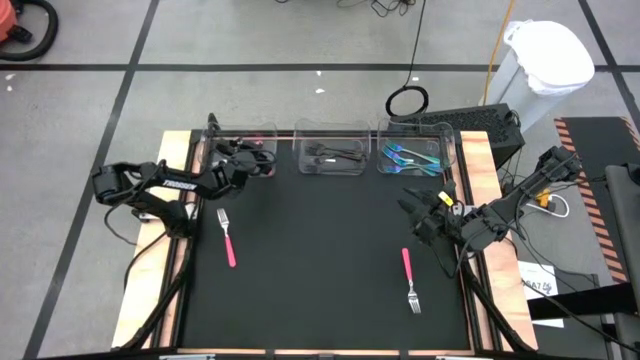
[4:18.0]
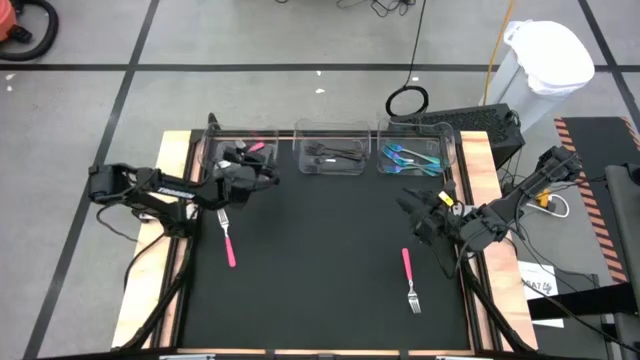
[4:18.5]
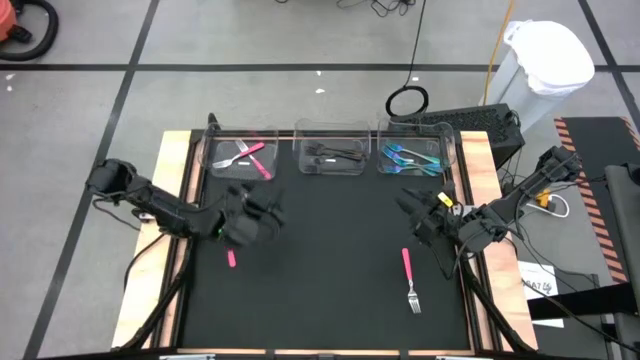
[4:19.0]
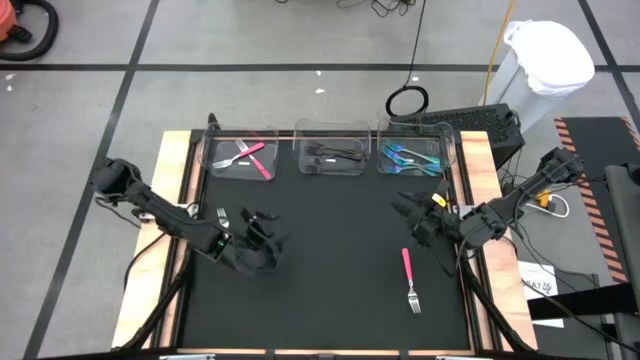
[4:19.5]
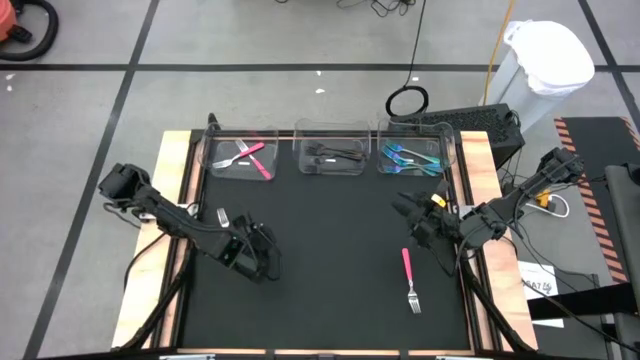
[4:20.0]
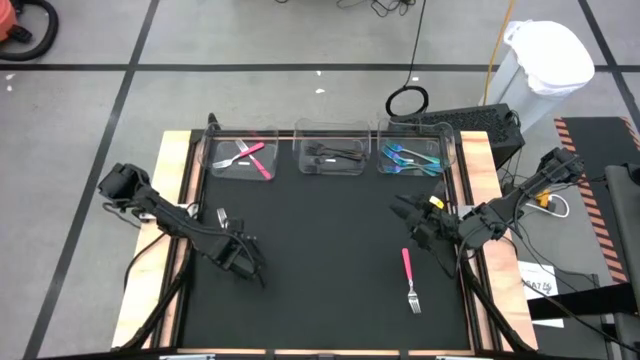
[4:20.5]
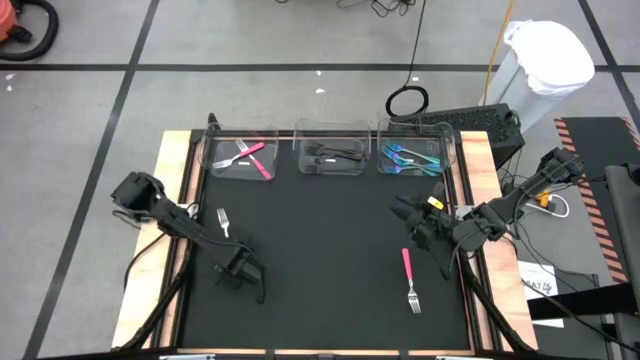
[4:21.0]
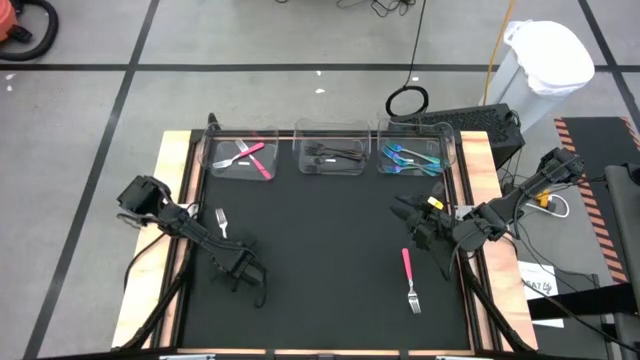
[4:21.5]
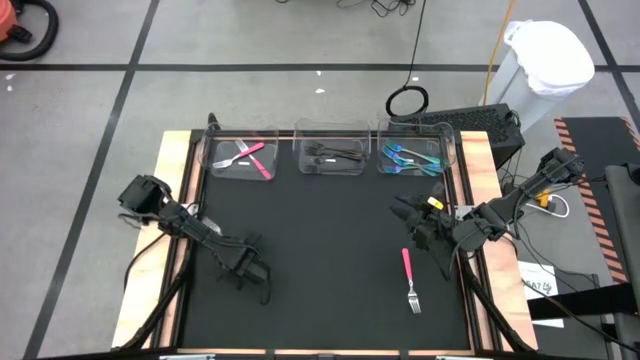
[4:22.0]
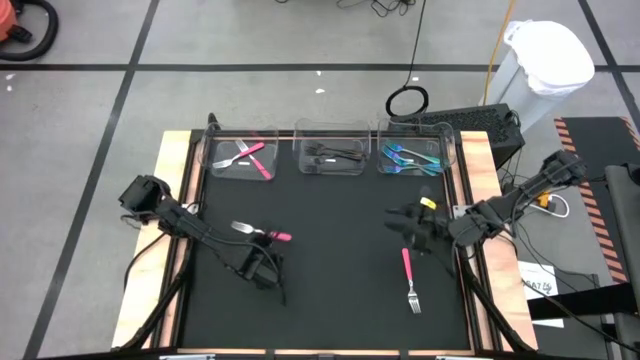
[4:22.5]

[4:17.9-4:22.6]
Task: Sort silverware by color (type)
Put the pink fork into the left transparent bin

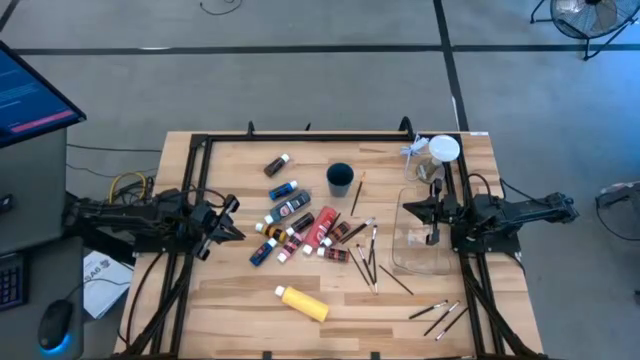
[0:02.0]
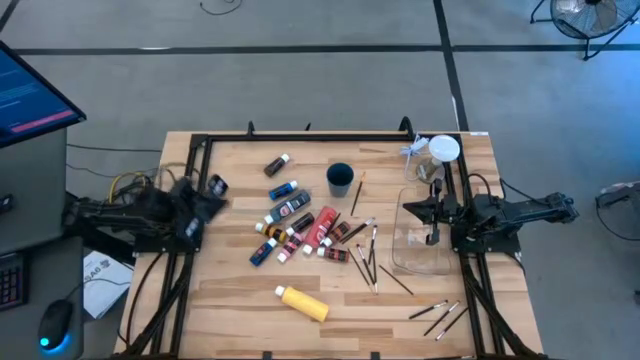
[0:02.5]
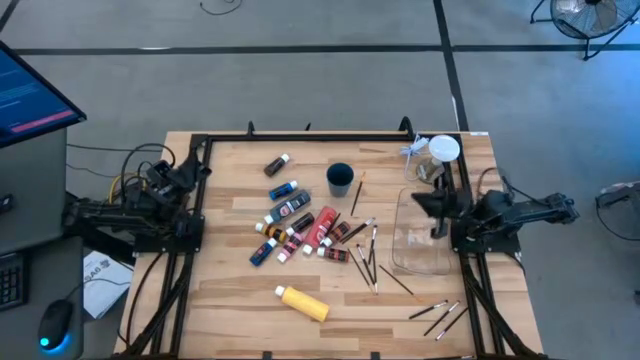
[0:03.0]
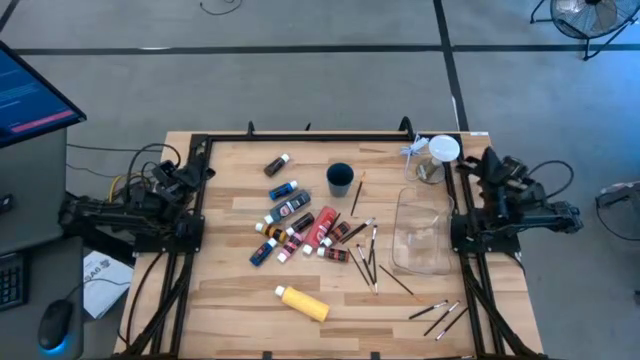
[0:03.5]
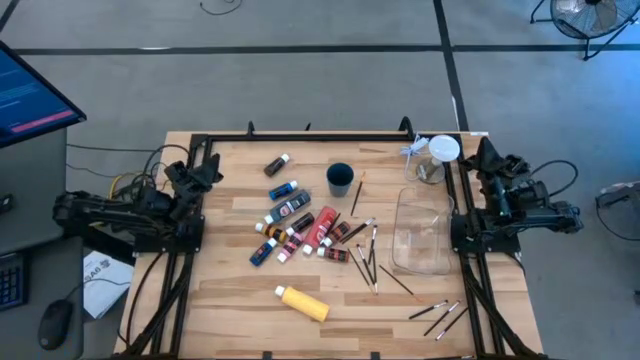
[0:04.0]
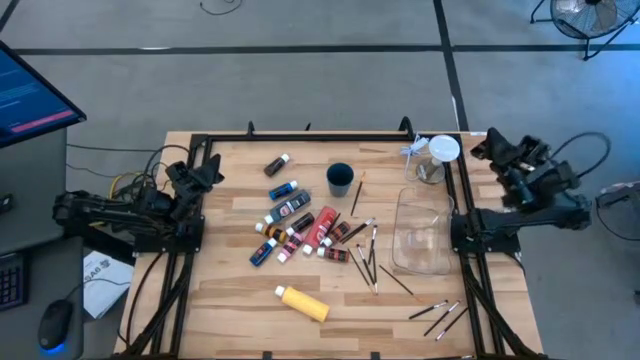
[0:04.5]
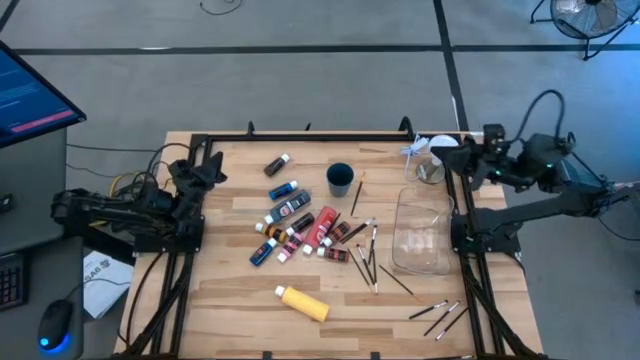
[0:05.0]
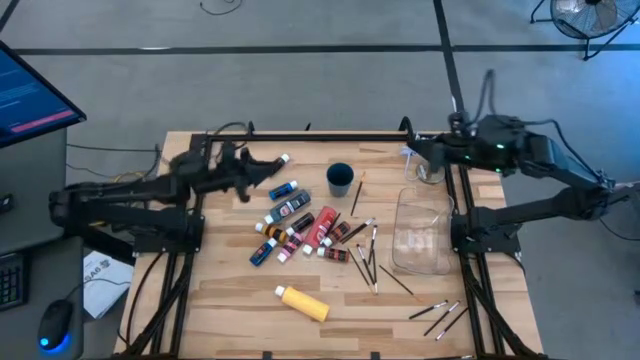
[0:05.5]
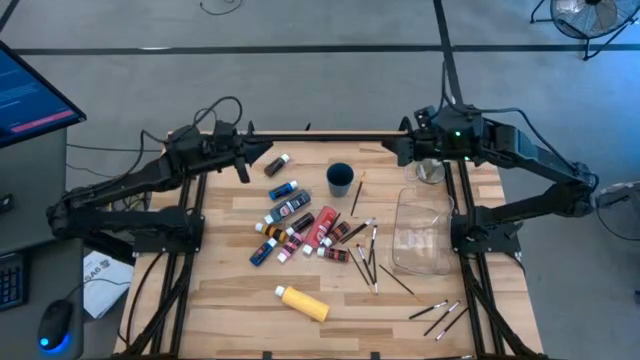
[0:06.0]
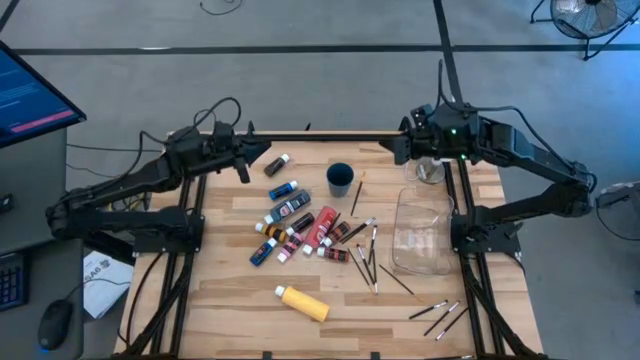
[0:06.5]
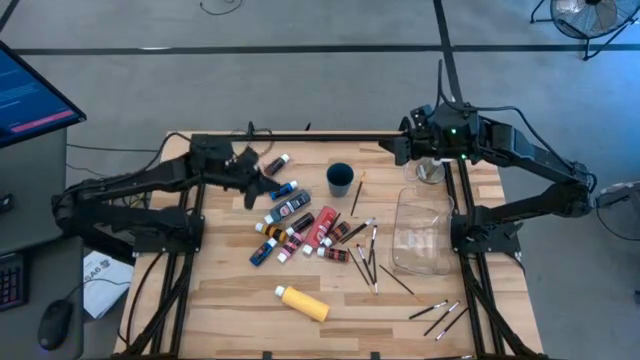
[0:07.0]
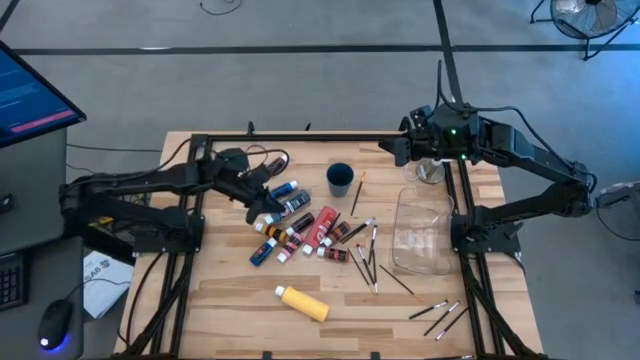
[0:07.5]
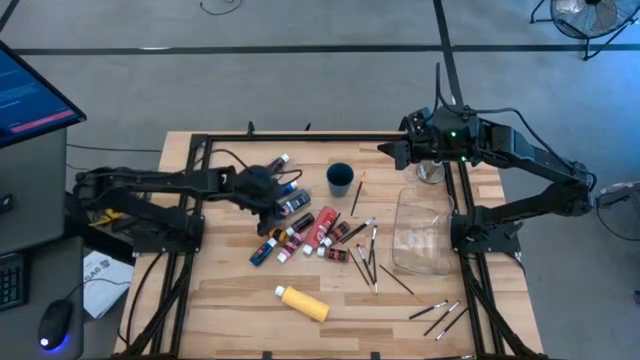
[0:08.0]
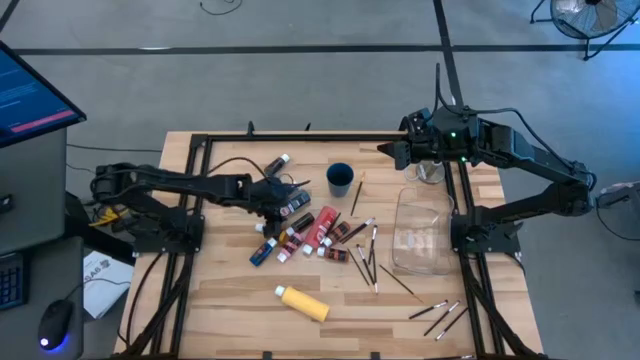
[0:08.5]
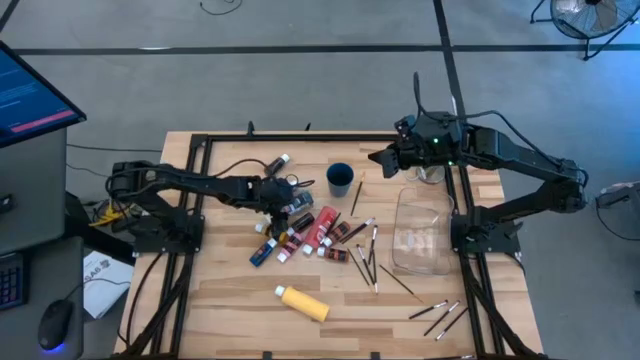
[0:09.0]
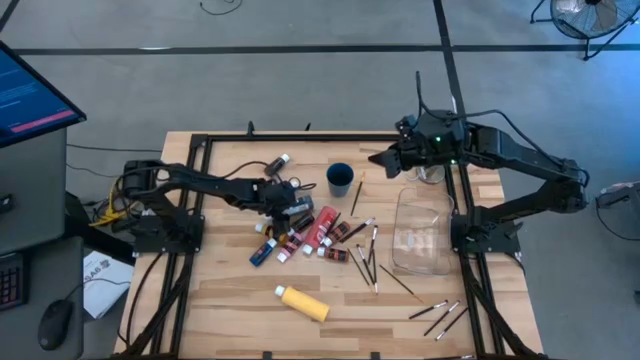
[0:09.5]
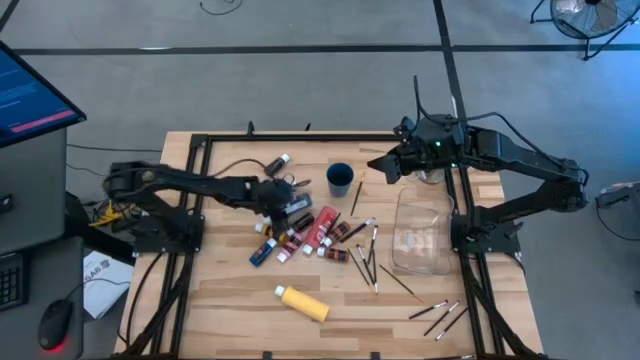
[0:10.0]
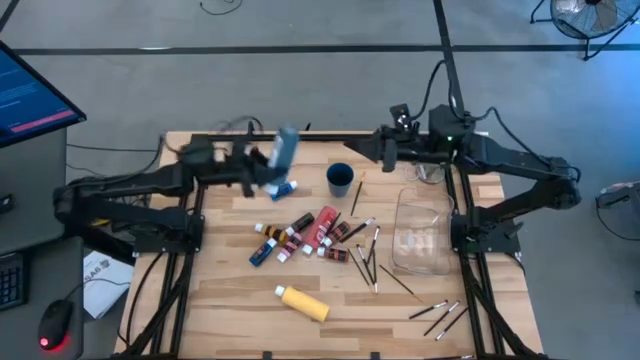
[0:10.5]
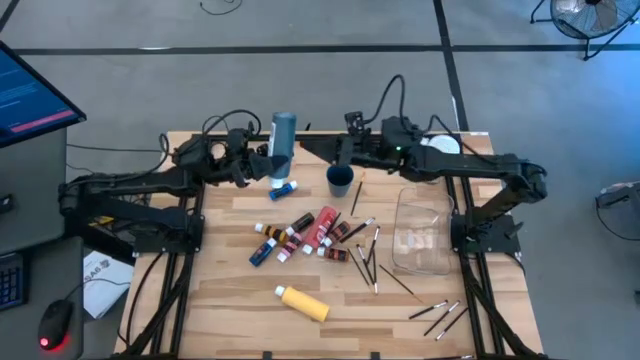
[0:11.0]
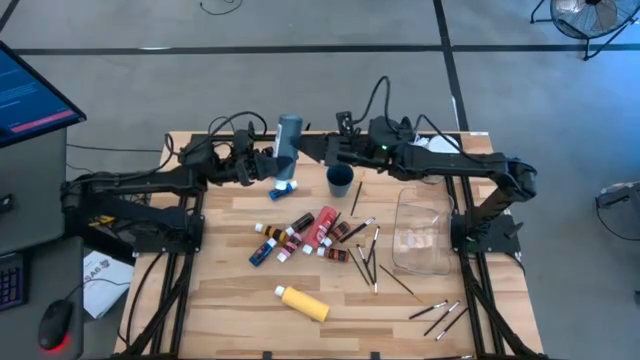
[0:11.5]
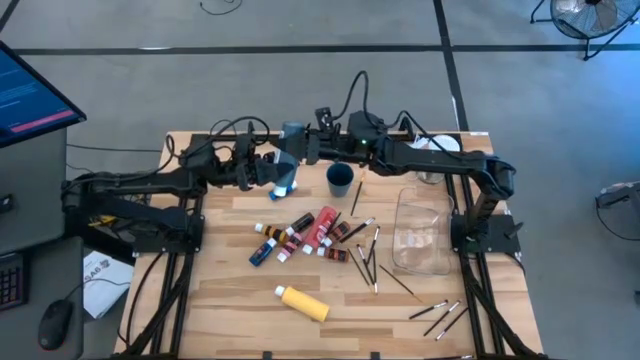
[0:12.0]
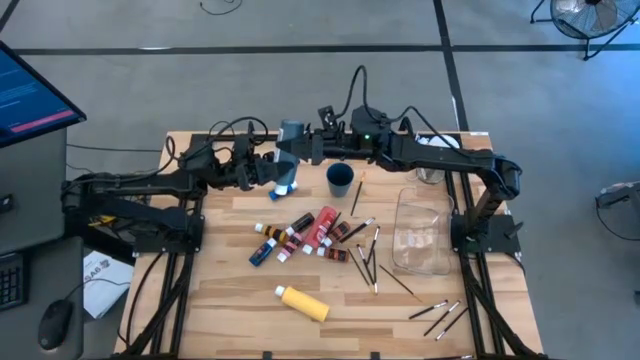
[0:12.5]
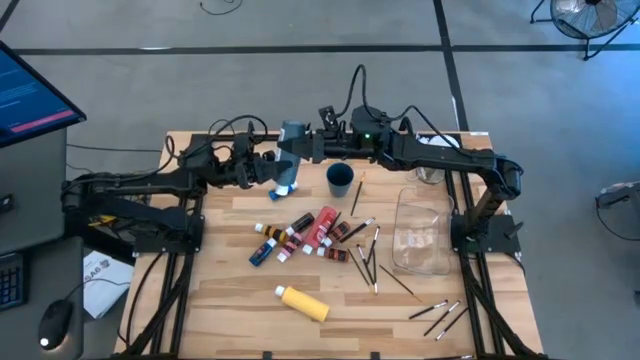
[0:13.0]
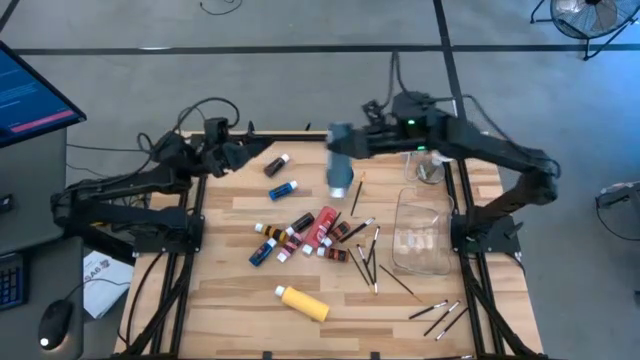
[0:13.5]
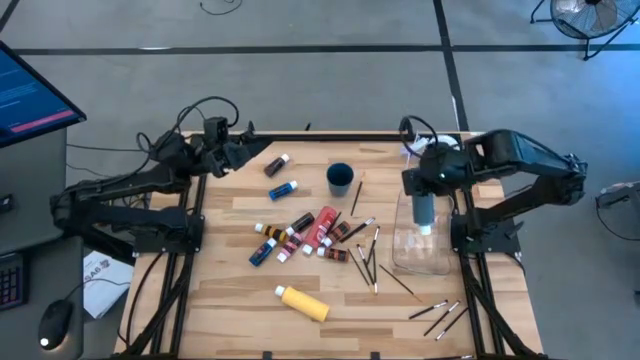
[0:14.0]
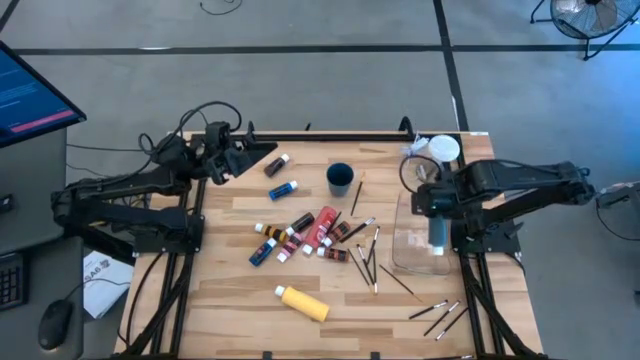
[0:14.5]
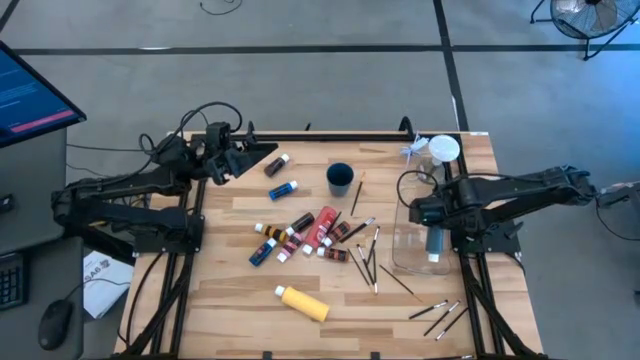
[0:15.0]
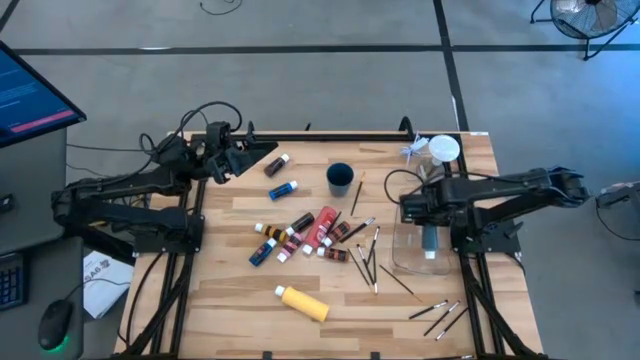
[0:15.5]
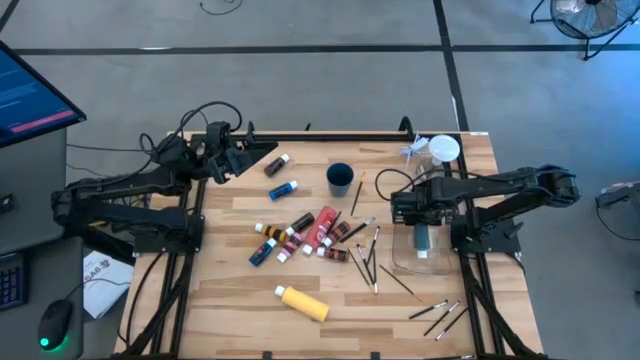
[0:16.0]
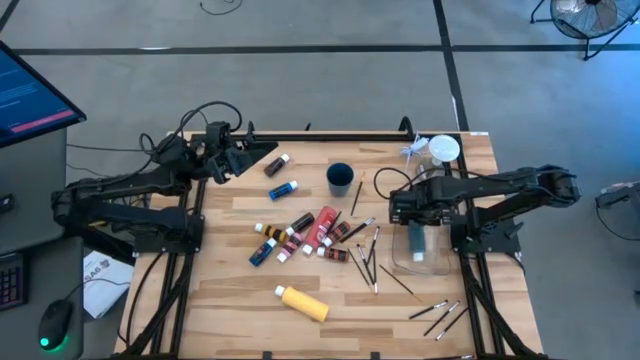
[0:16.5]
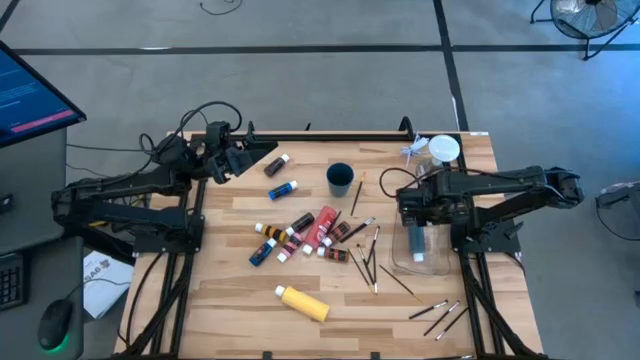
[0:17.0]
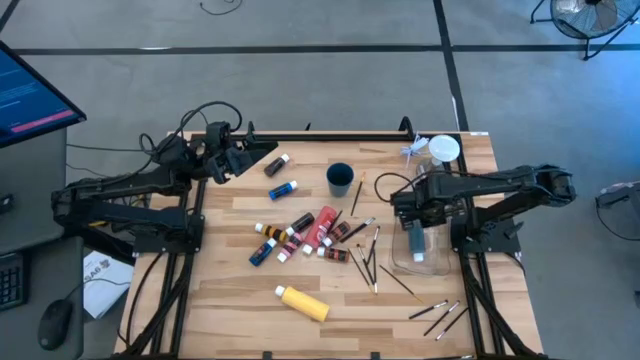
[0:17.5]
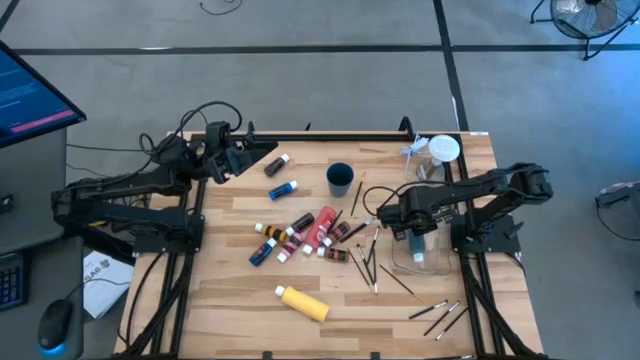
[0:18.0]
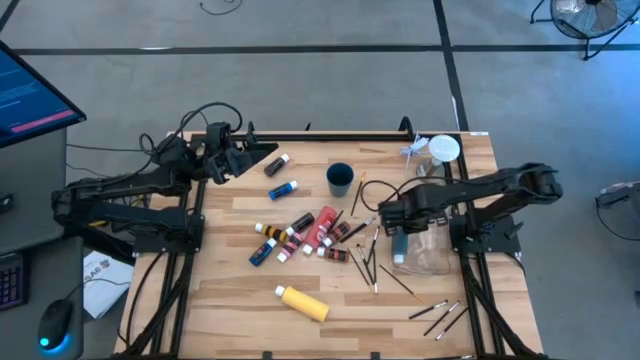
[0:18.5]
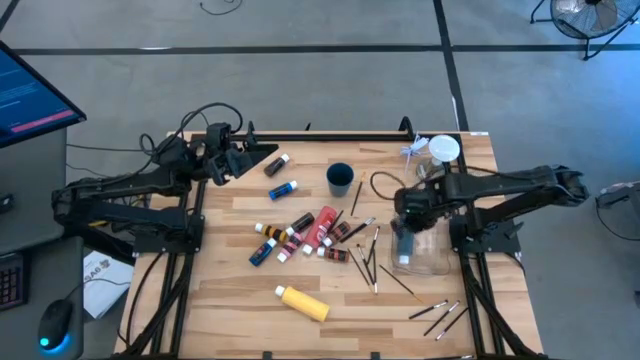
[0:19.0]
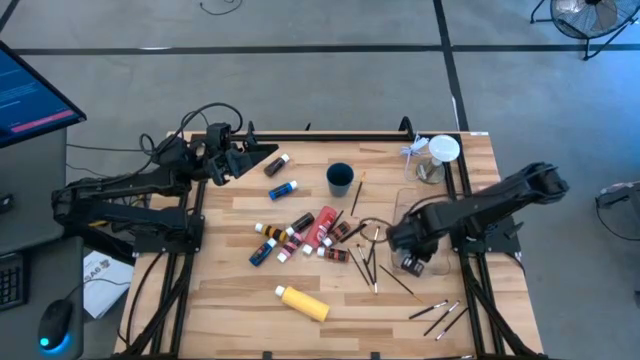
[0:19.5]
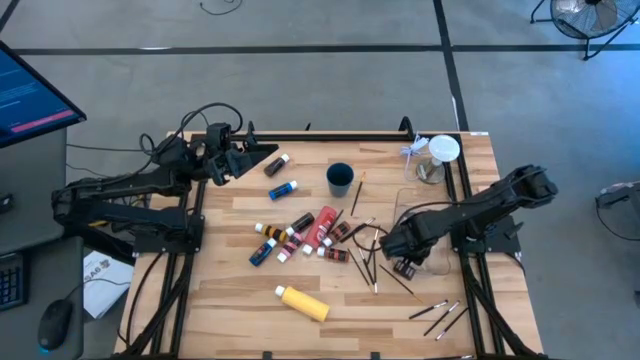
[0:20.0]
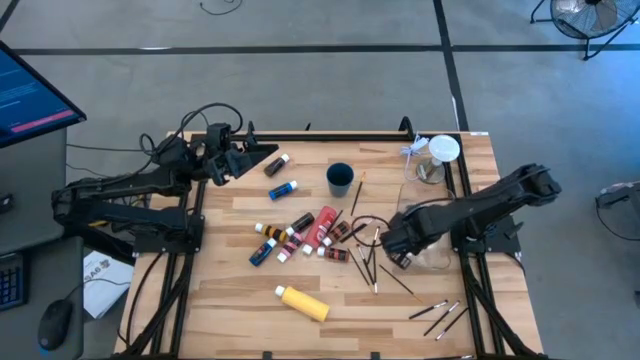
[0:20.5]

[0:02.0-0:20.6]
Task: Pick & Place Paint Supplies
Put the large black paint bottle into the transparent bin
